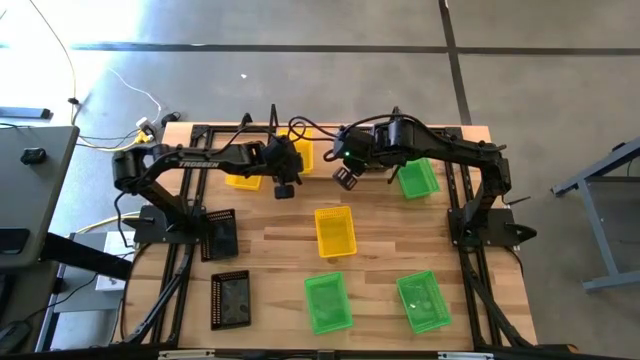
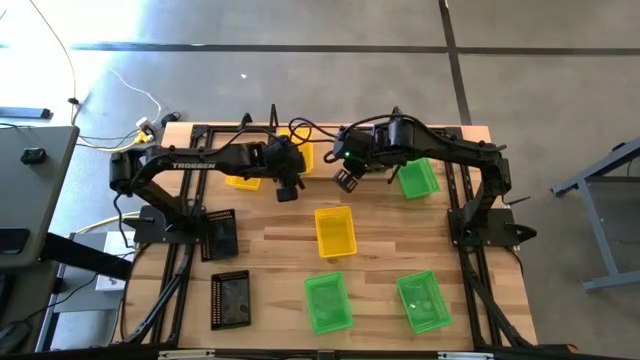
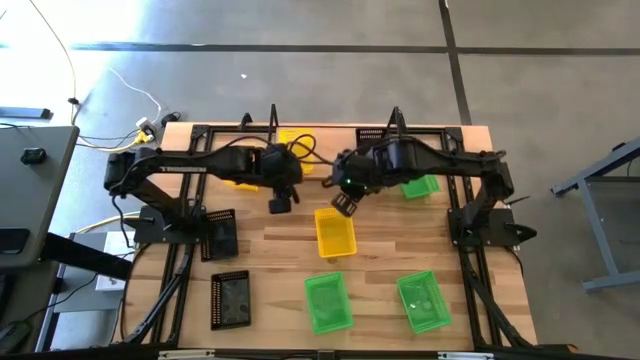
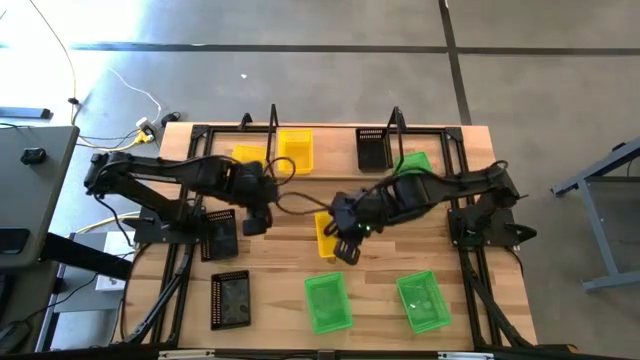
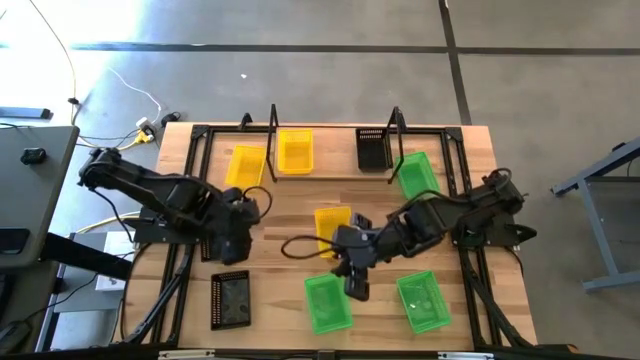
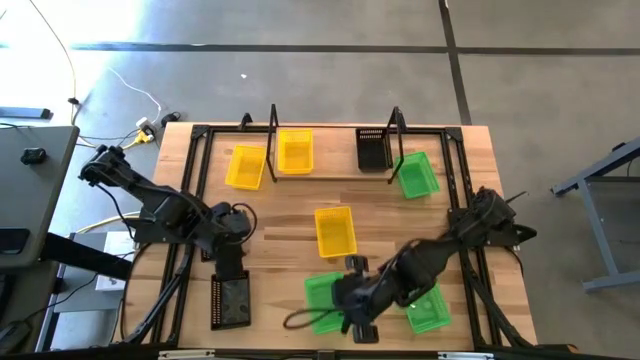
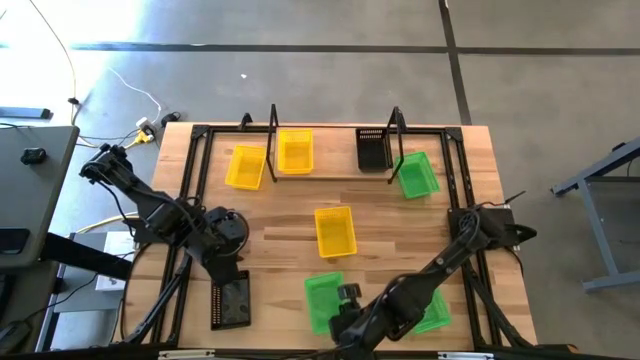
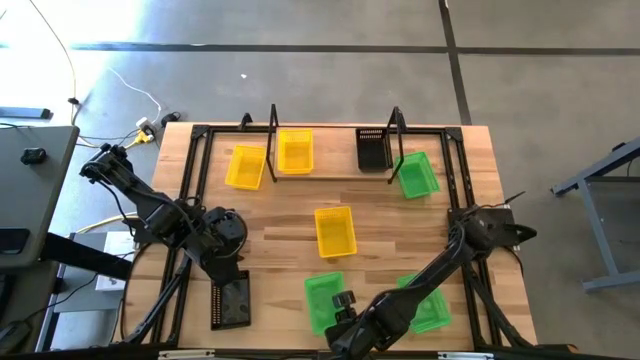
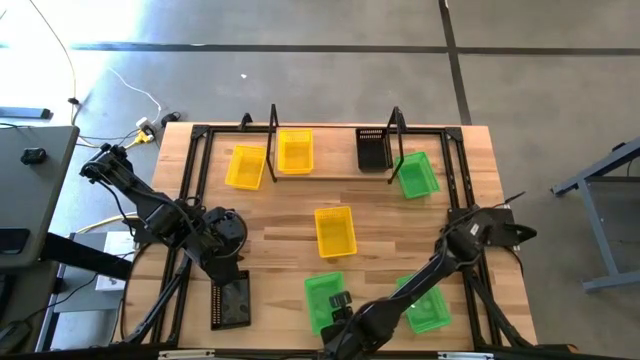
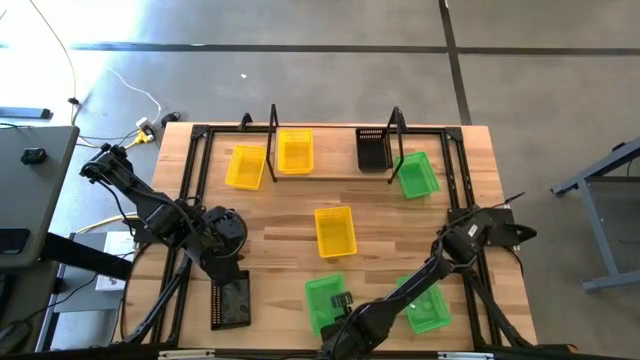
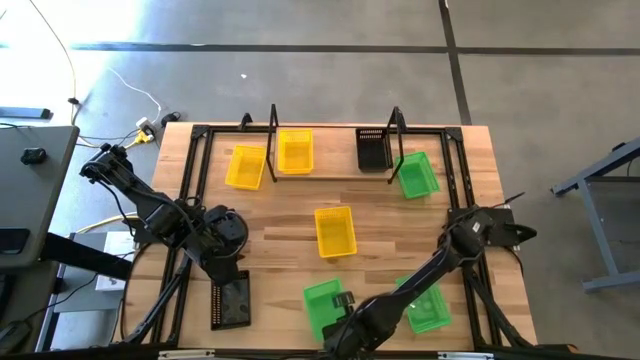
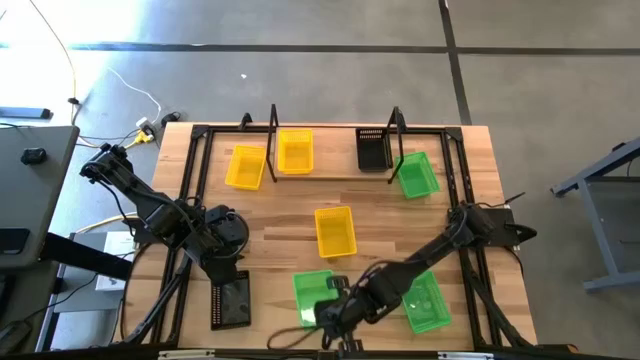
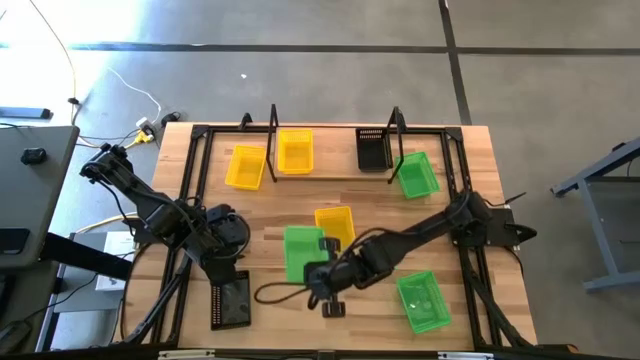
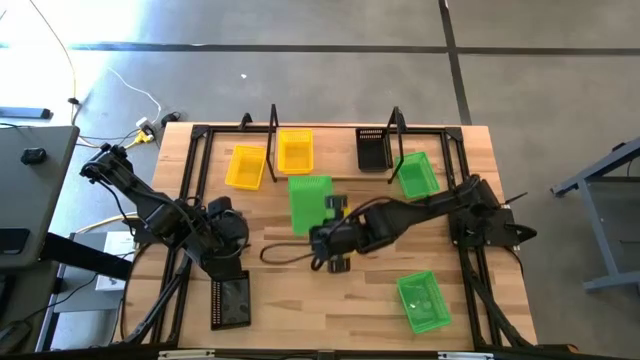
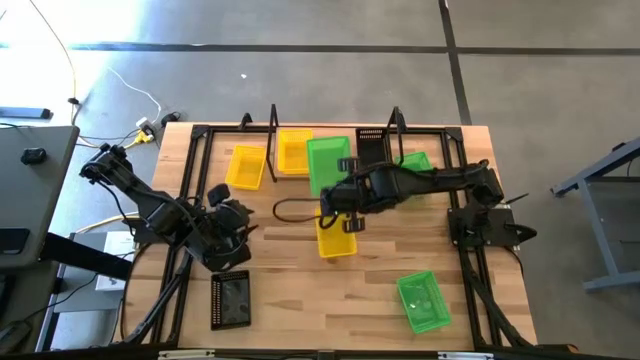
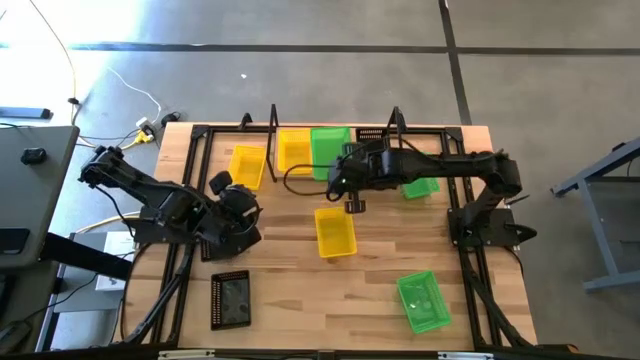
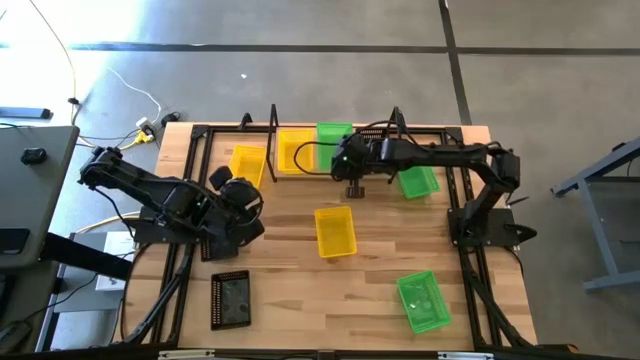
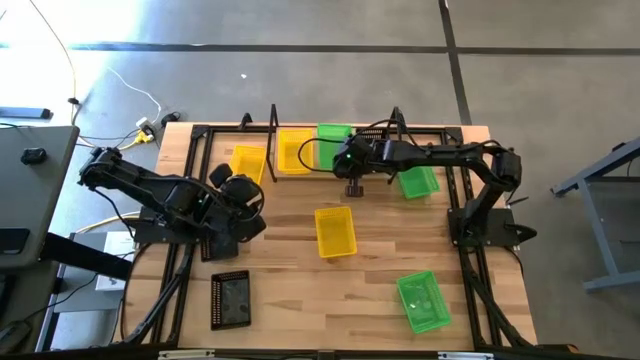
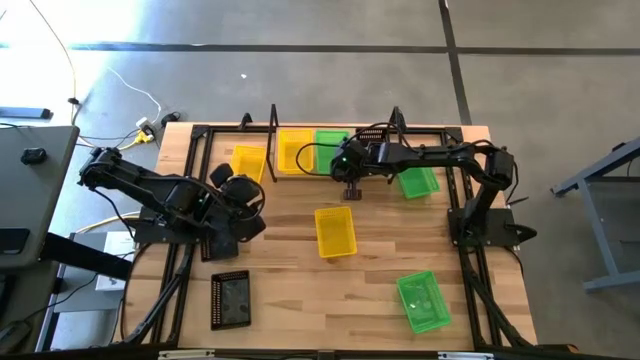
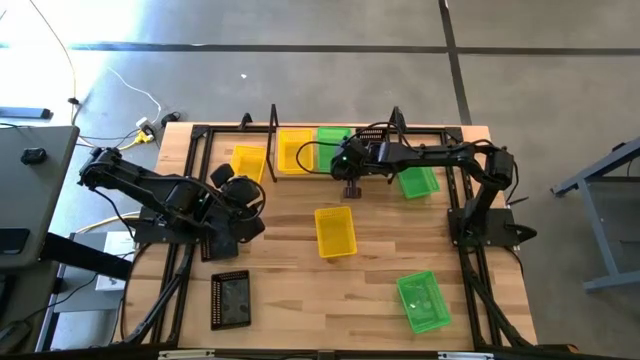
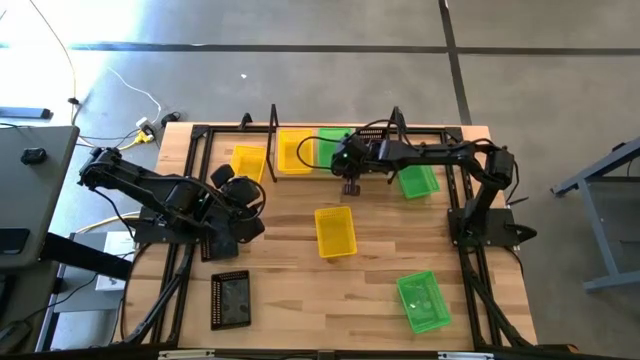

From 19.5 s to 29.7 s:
Task: Stack baskets on shelf by color
Put the bottom left green bin on the shelf

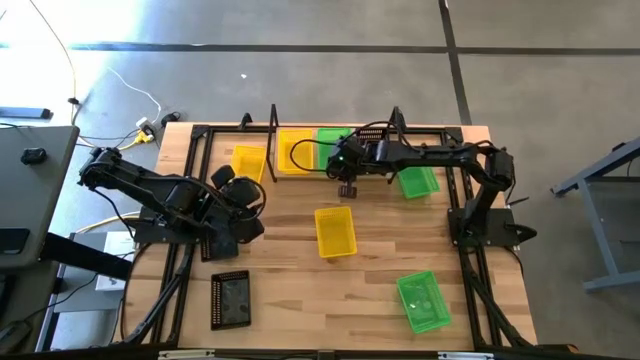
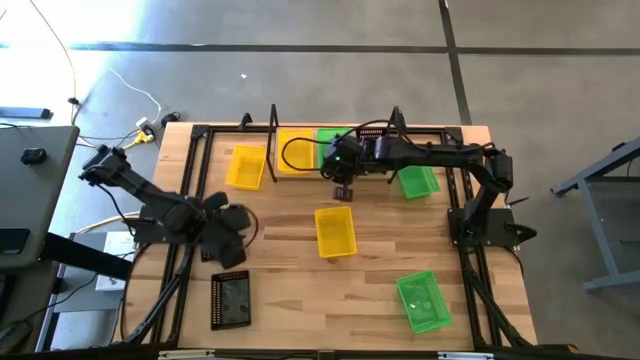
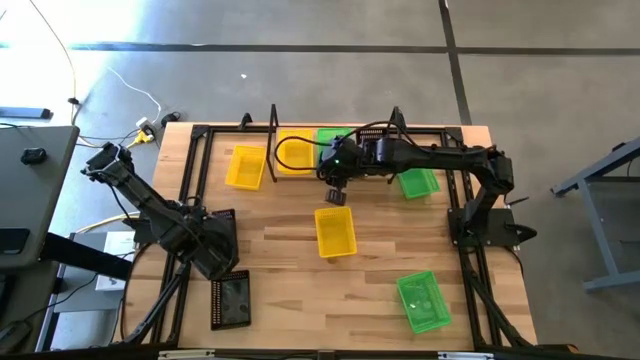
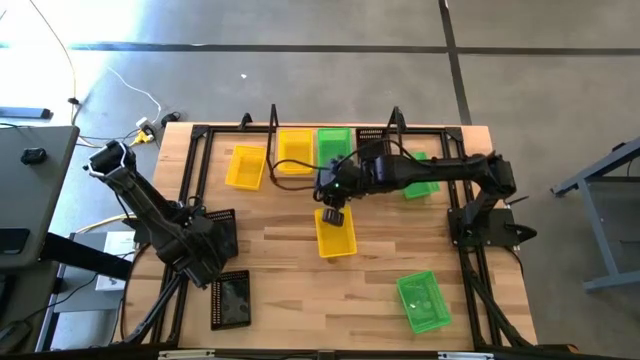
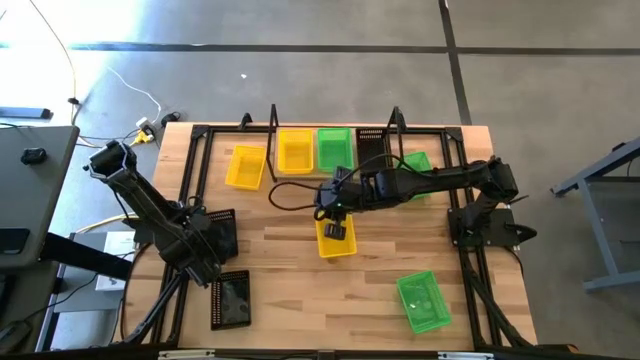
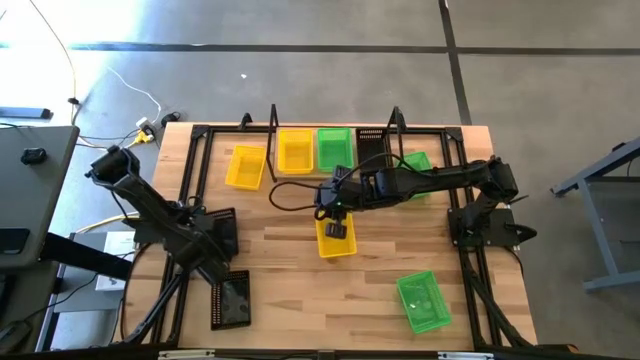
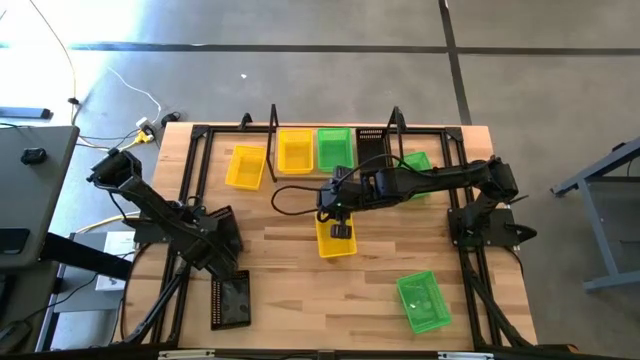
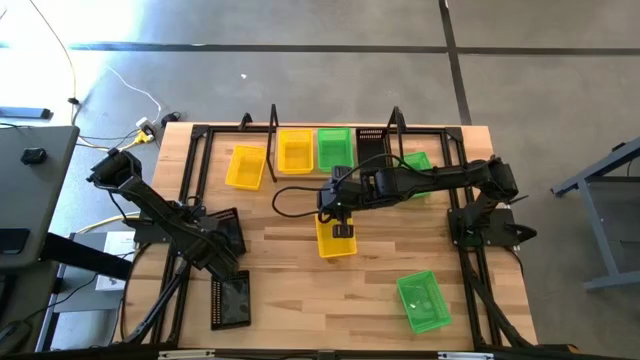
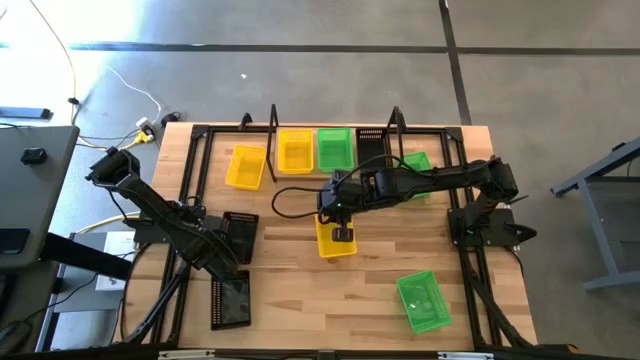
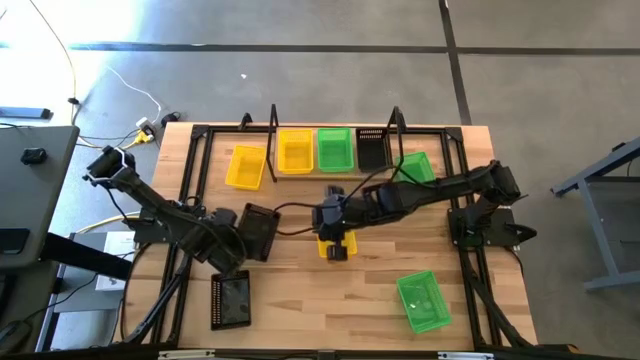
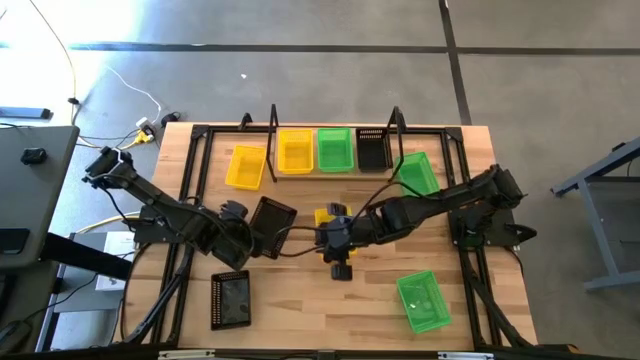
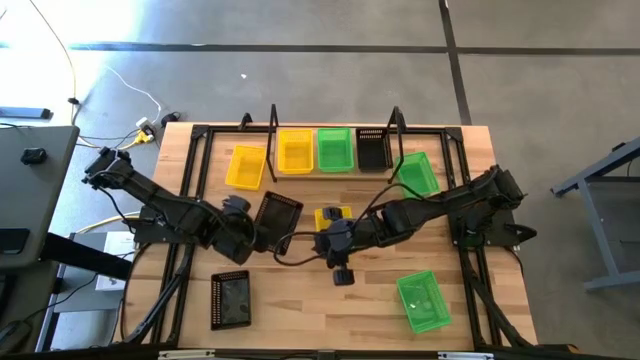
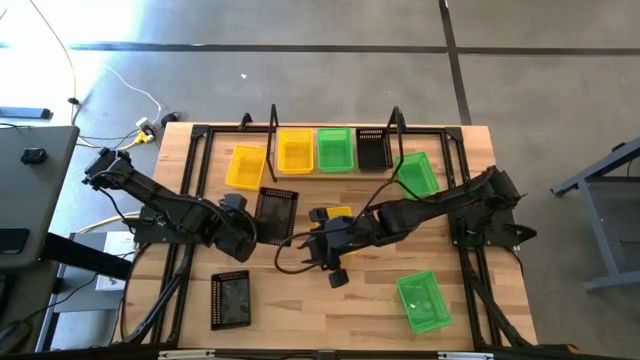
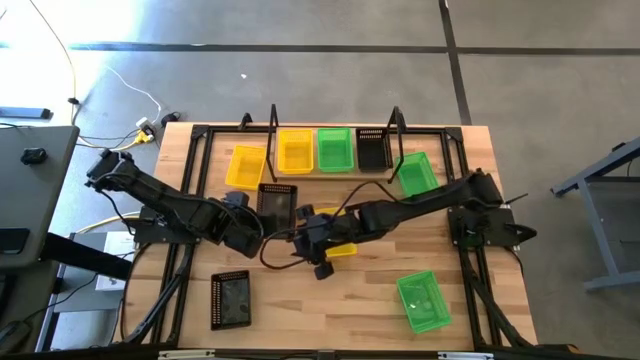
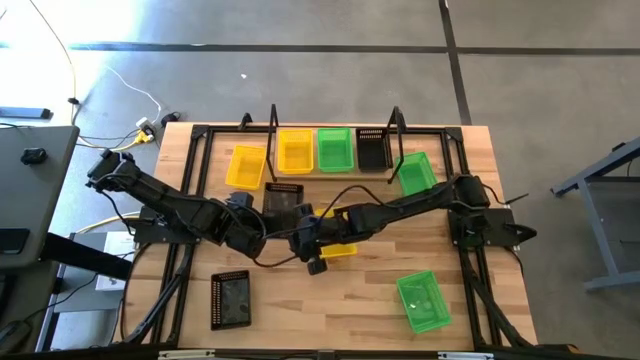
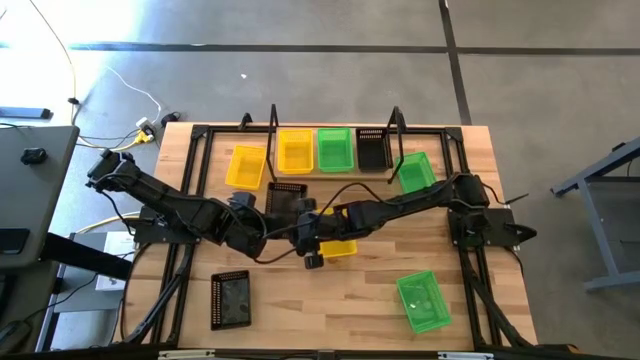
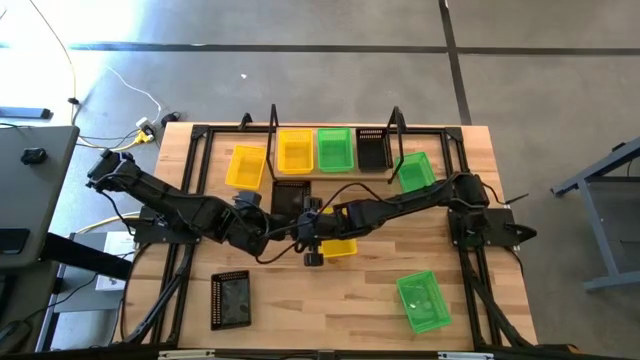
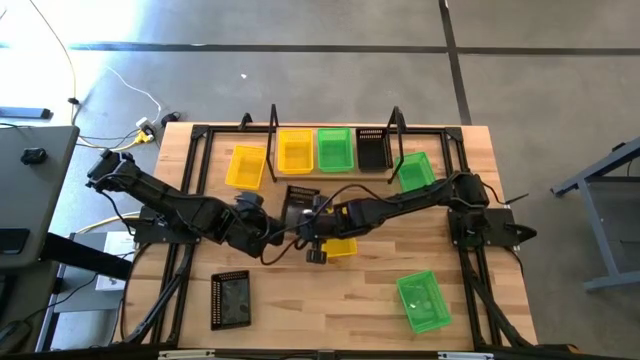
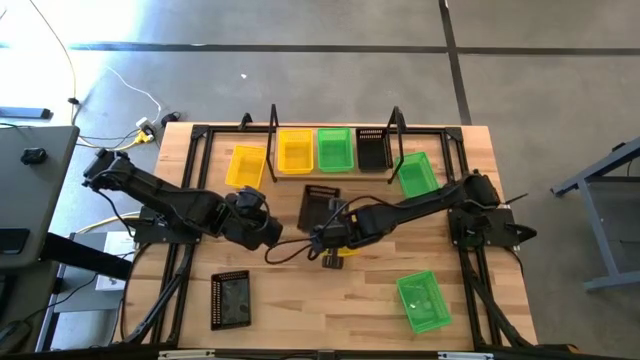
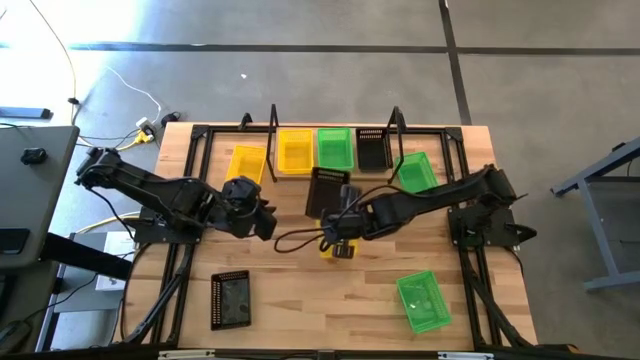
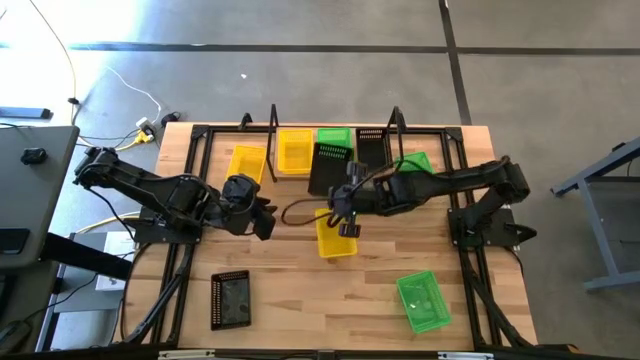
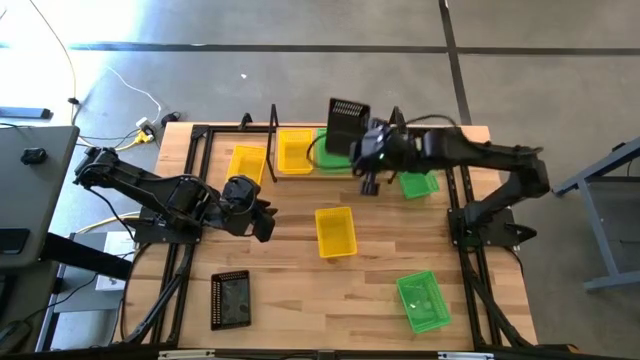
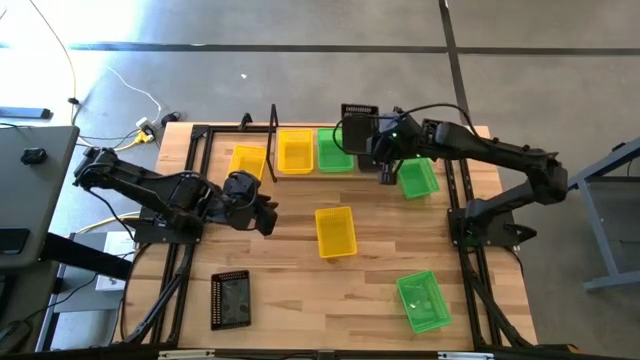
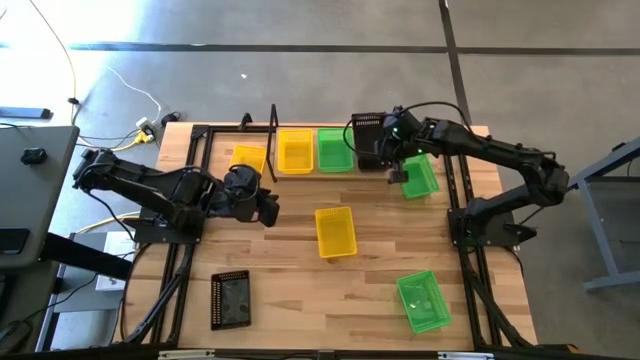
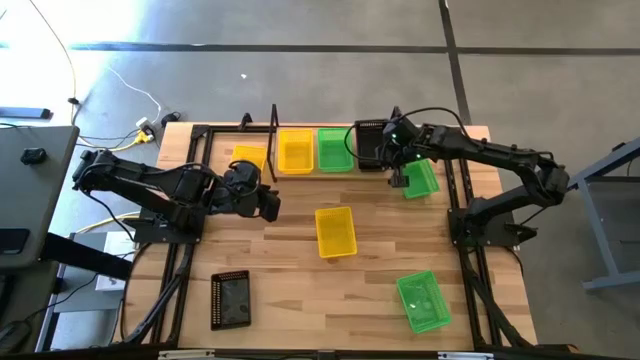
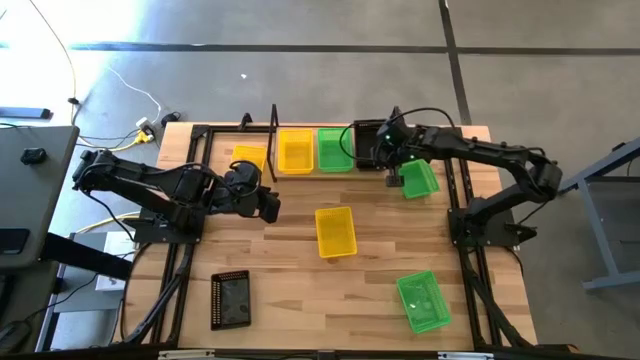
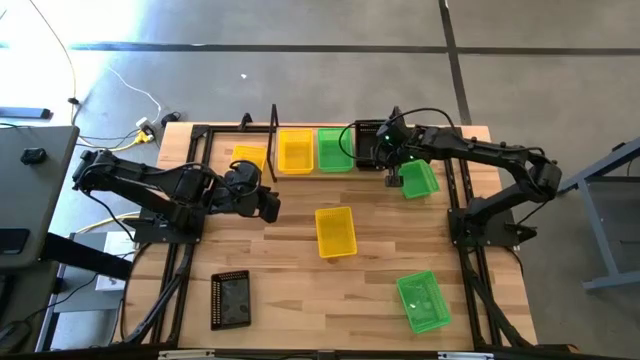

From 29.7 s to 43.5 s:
Stack the top black bin on top of the black bin on the shelf
